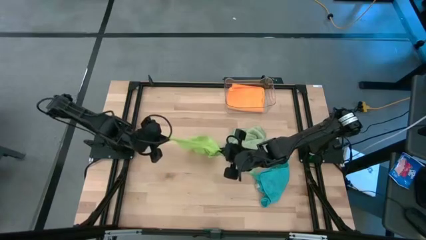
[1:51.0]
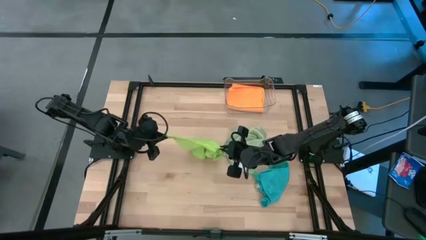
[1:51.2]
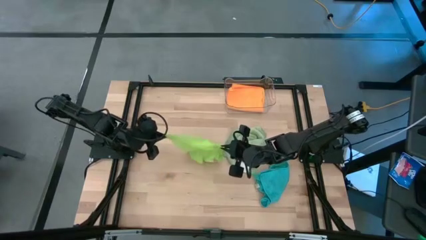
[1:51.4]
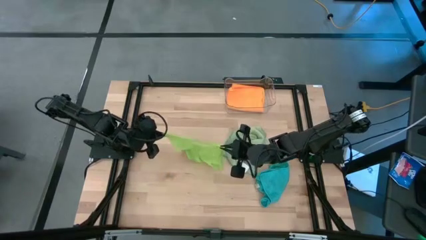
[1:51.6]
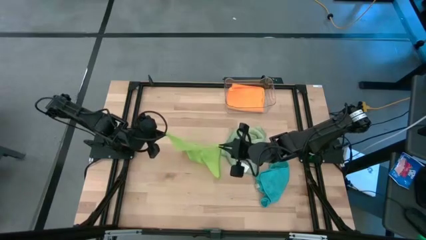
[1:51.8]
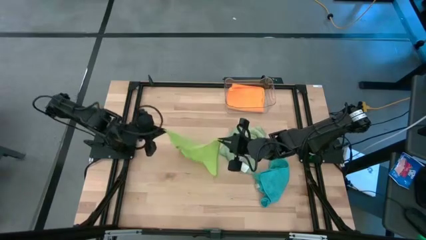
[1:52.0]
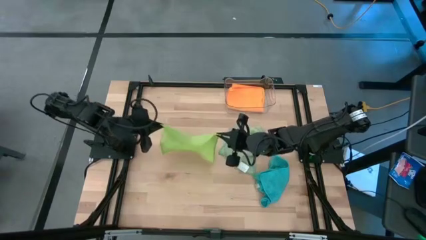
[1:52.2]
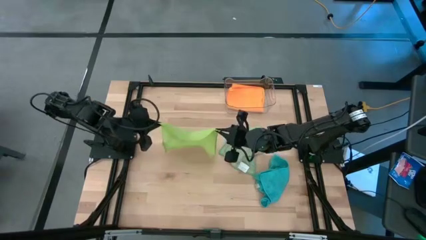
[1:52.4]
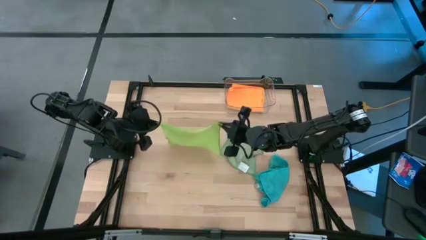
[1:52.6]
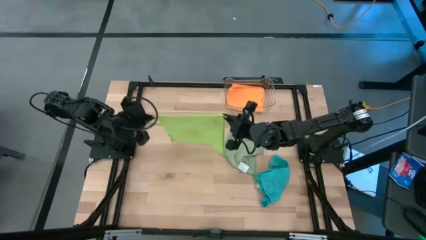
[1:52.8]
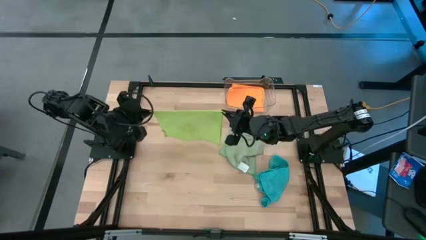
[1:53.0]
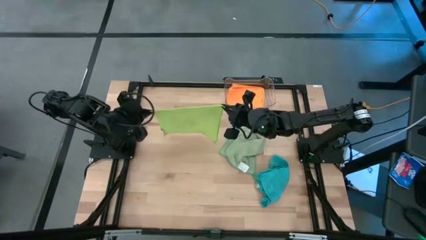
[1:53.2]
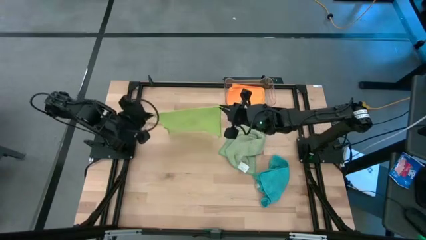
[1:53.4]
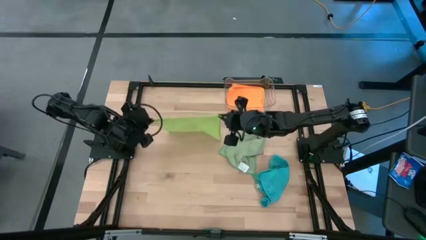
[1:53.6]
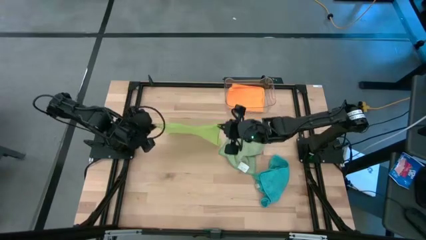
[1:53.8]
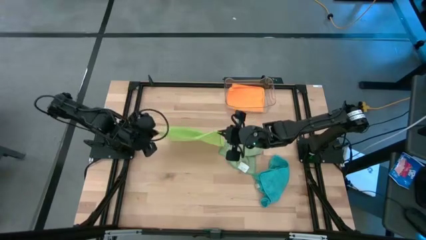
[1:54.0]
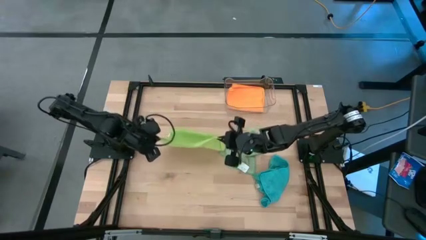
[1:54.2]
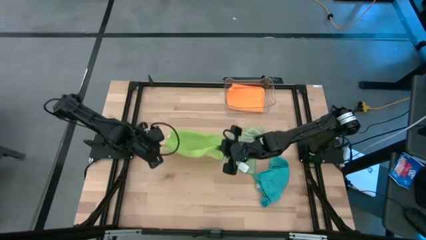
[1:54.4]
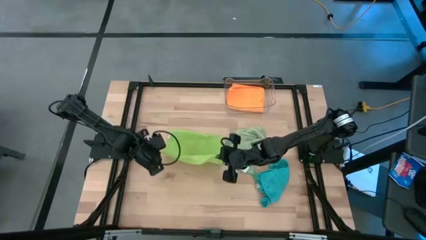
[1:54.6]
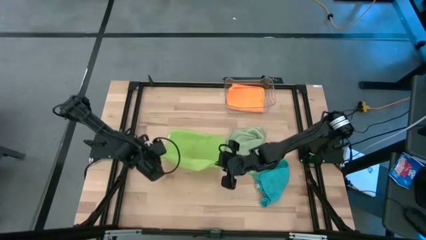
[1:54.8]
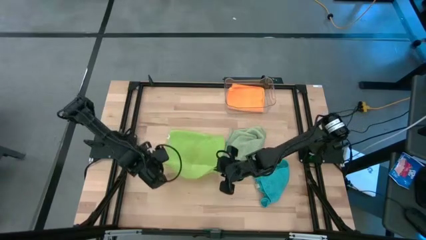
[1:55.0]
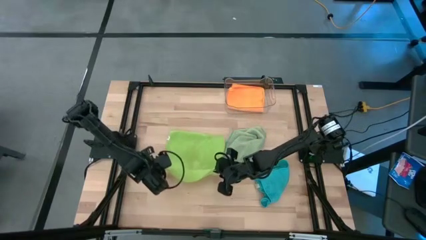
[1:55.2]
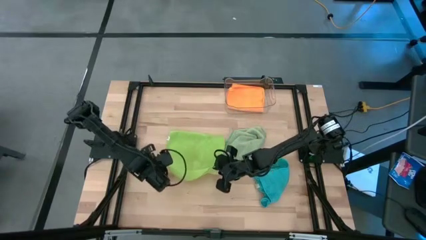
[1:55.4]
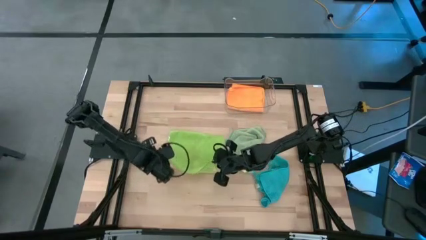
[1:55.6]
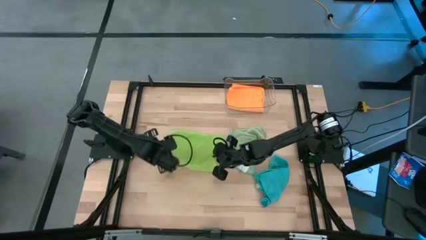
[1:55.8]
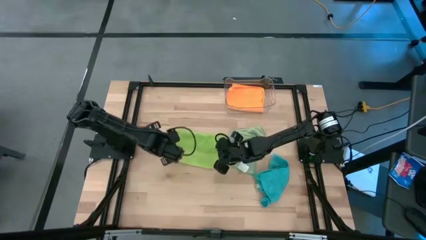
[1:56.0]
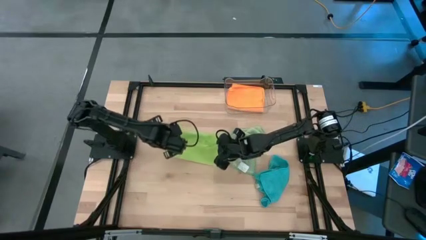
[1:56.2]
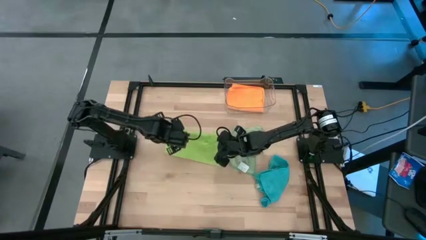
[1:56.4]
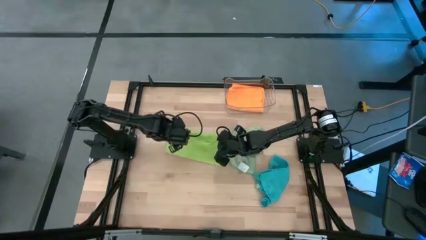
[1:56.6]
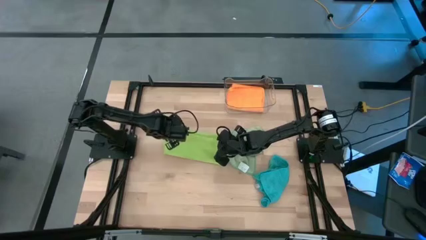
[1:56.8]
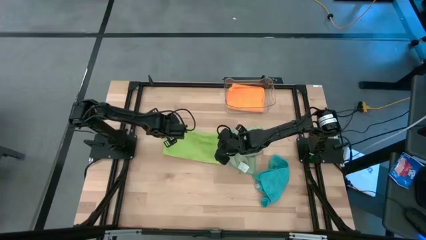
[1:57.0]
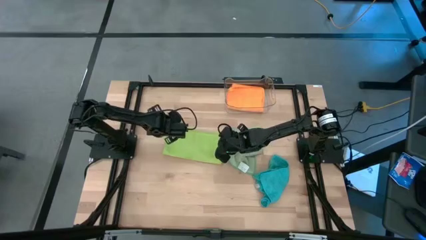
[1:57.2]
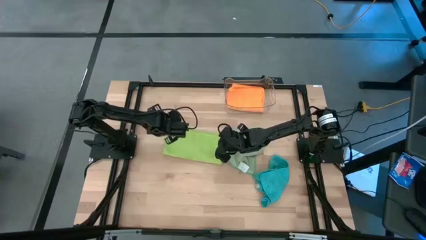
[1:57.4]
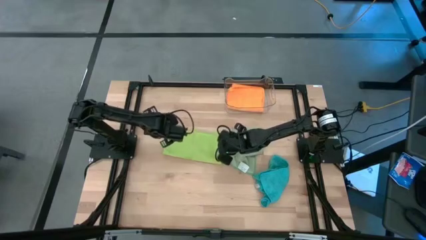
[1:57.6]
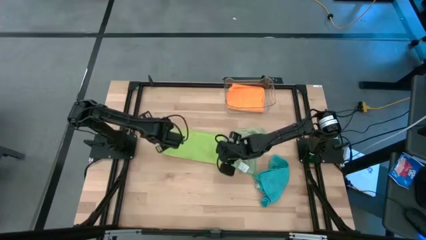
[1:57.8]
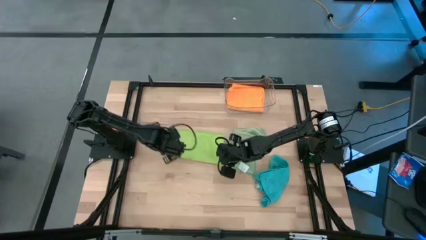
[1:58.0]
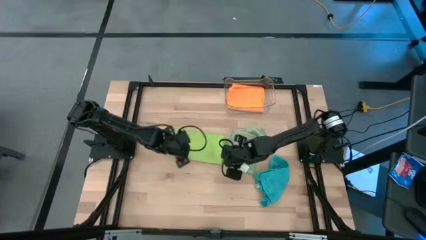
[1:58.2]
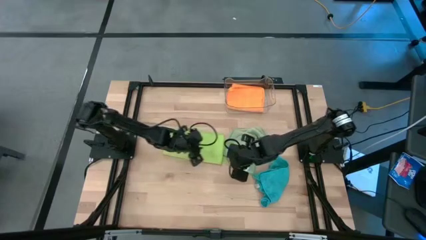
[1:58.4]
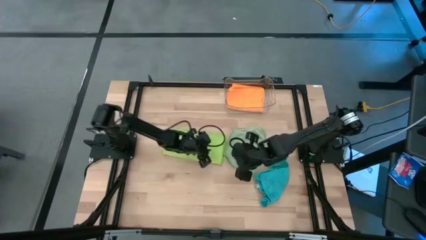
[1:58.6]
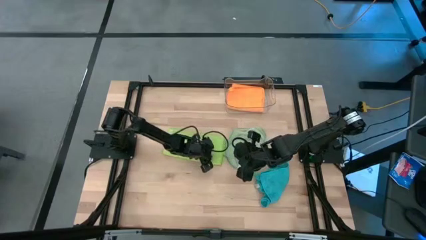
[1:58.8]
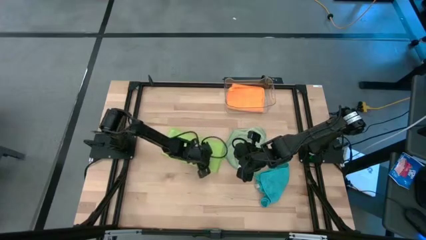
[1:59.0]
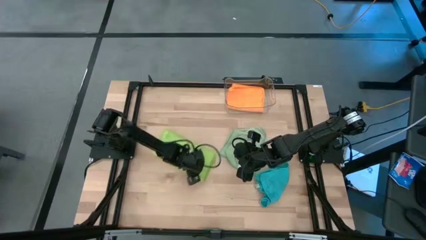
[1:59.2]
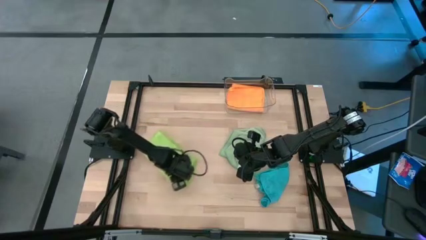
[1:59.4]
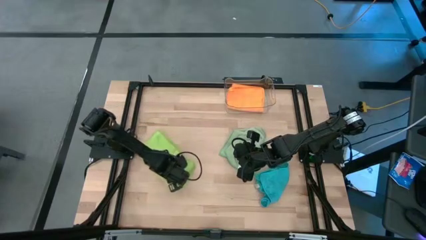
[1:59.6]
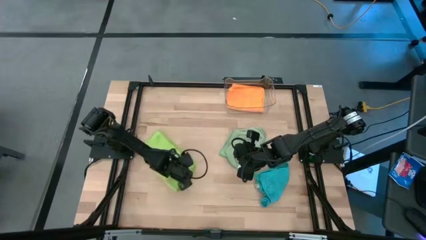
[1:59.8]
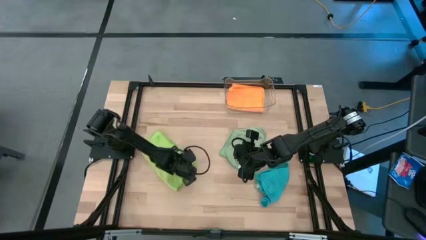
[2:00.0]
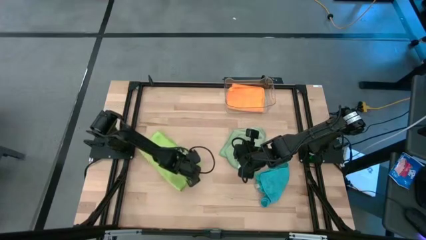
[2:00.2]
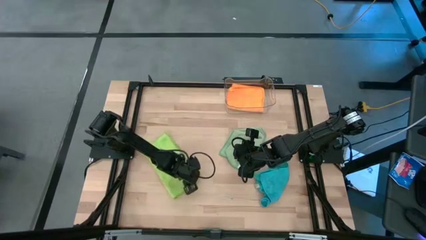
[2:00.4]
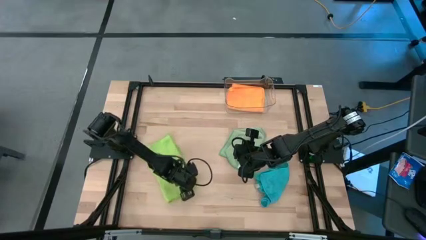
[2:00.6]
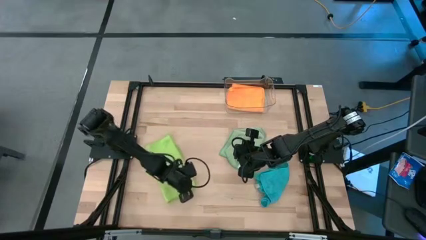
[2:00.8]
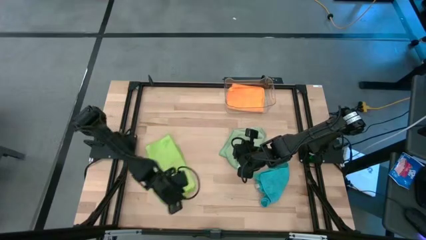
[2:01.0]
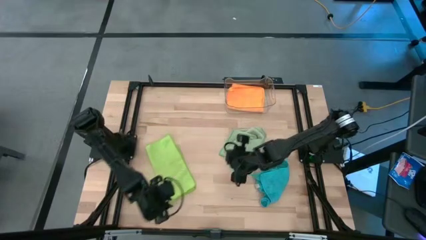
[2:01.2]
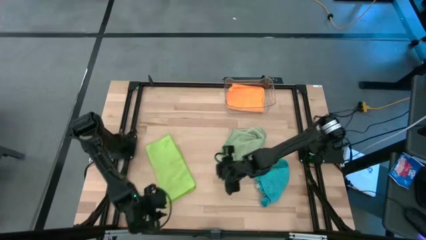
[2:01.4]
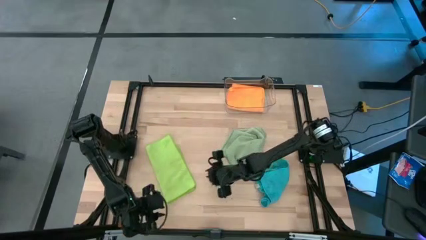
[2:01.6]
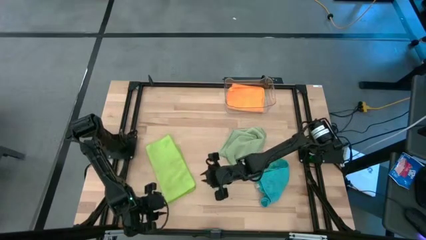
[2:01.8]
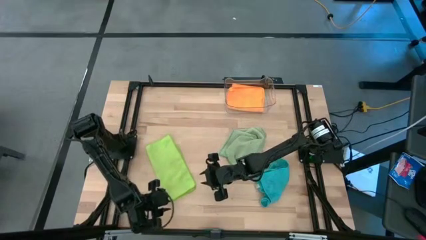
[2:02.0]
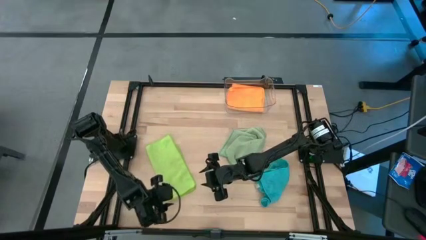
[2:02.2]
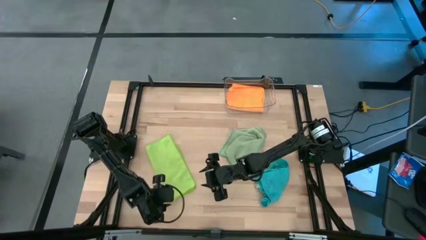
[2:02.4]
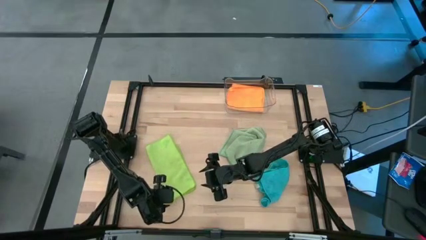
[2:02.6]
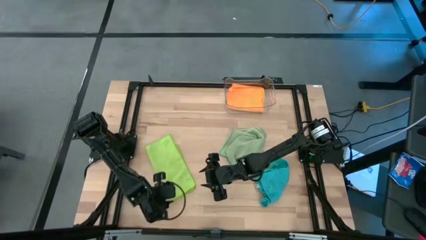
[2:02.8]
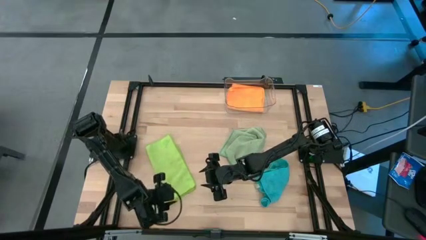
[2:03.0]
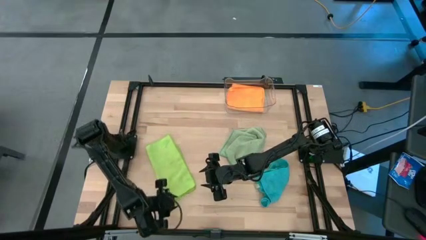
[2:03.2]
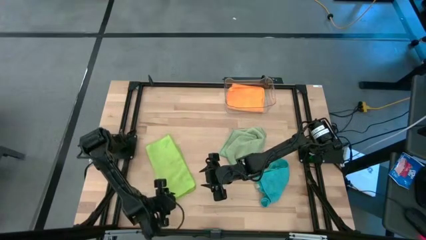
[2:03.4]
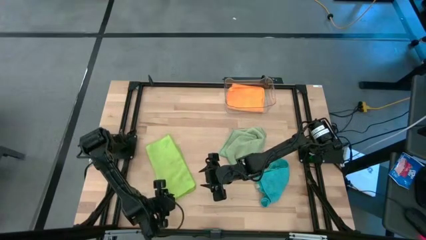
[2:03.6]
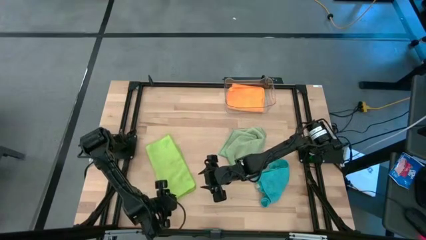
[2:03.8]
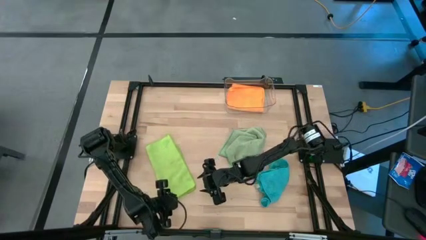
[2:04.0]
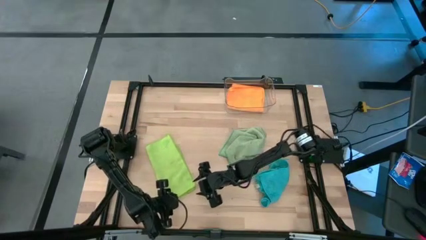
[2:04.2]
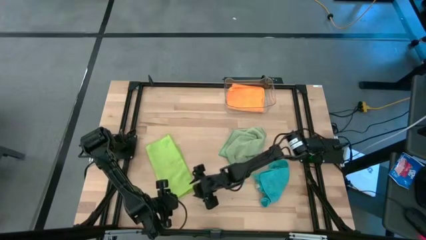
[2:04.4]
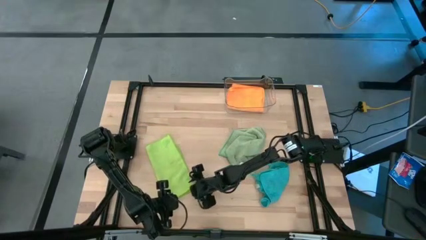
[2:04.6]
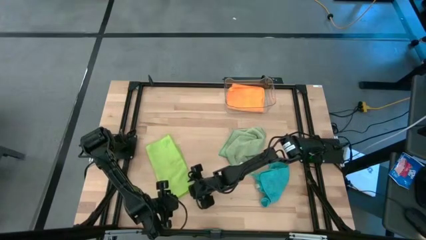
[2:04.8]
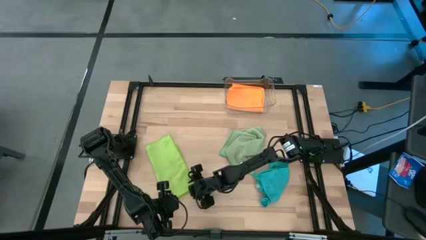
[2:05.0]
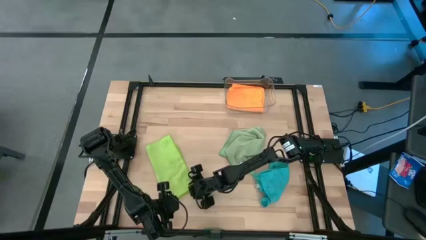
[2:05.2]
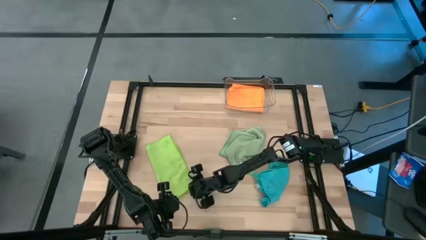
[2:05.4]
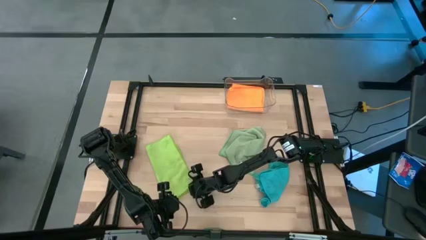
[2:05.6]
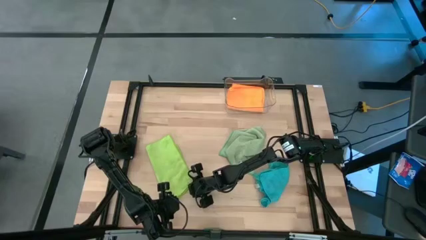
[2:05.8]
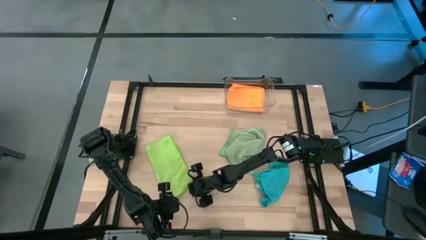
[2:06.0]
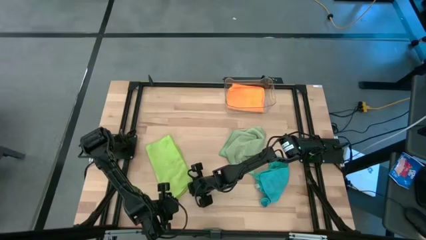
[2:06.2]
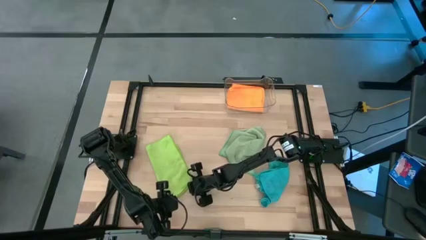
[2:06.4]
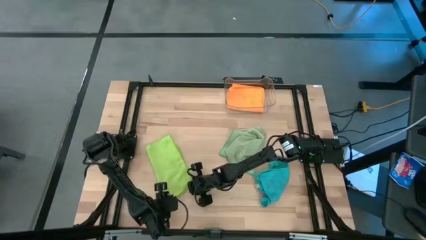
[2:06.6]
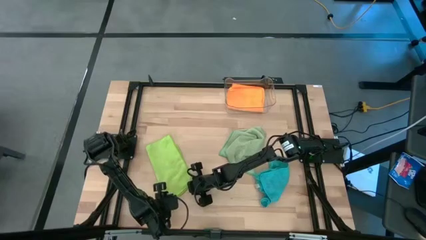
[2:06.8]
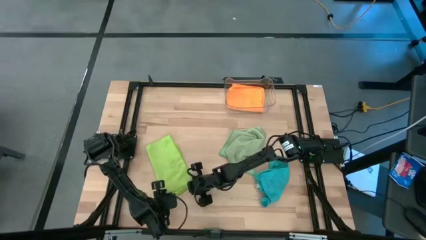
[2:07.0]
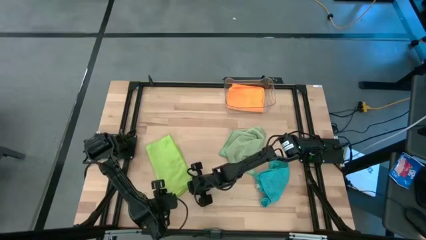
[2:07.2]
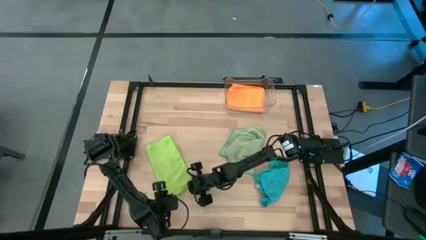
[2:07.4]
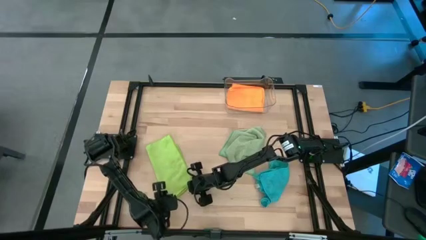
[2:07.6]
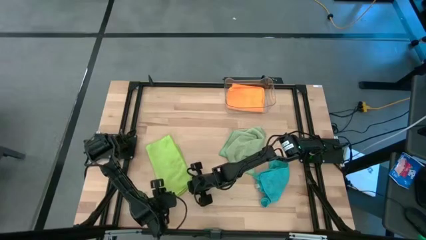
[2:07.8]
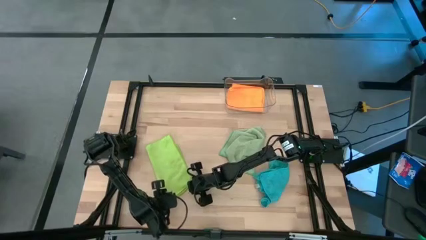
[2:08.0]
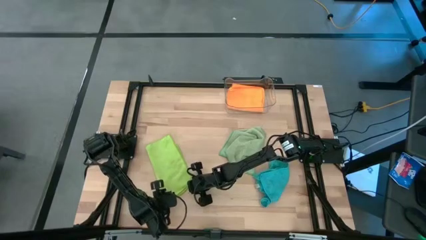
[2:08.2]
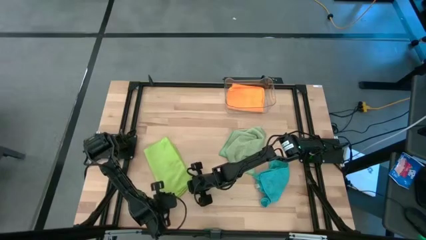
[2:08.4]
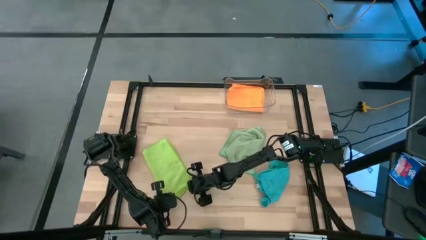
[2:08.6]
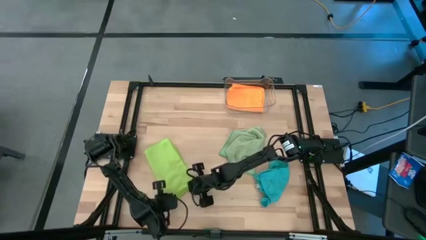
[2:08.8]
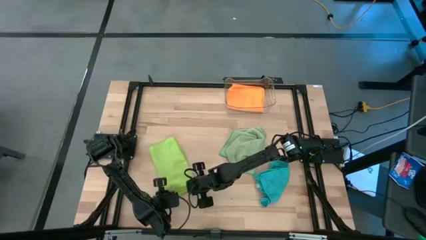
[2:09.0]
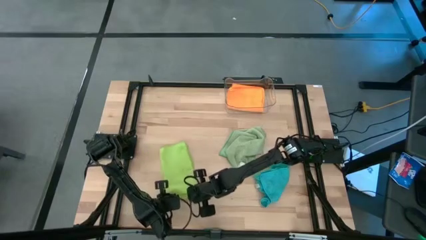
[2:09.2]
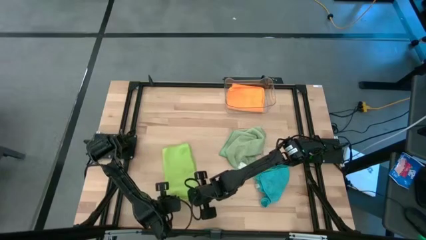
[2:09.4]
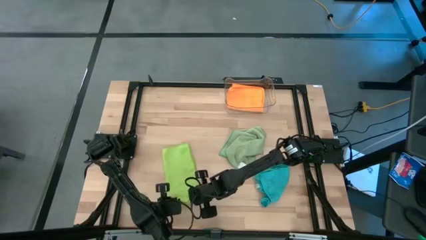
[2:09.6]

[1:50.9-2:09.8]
Task: Fold microfiber towels
Fold the light green microfiber towel
